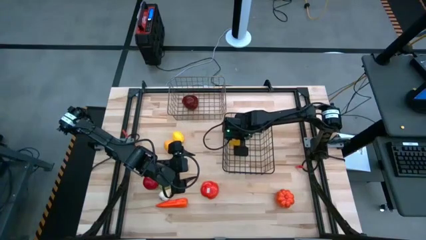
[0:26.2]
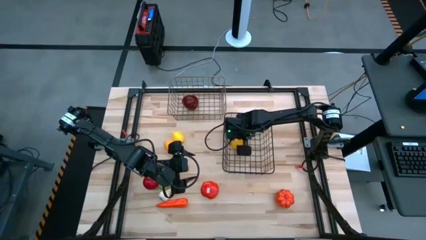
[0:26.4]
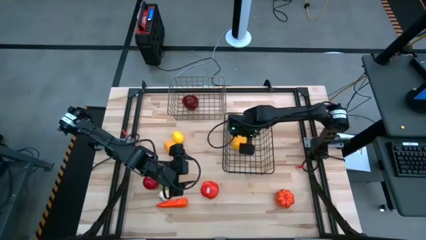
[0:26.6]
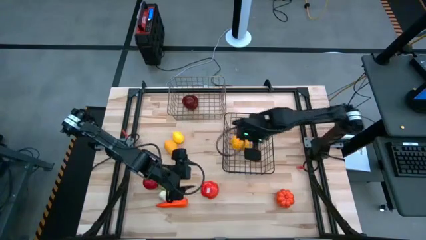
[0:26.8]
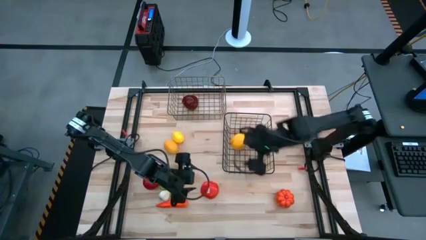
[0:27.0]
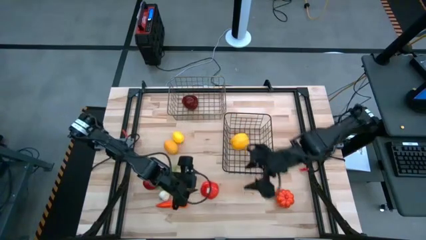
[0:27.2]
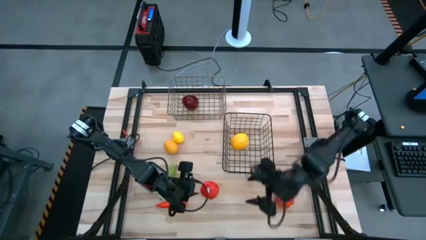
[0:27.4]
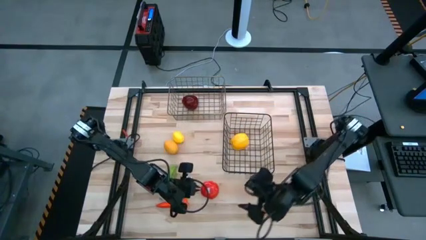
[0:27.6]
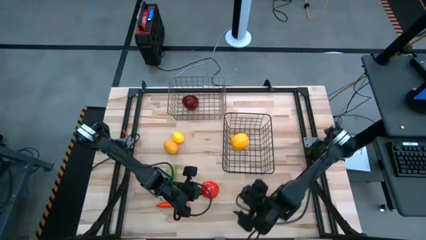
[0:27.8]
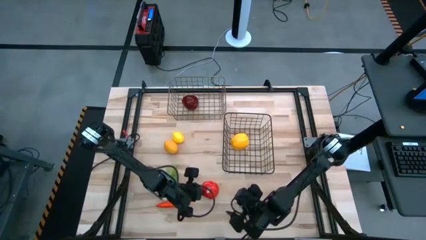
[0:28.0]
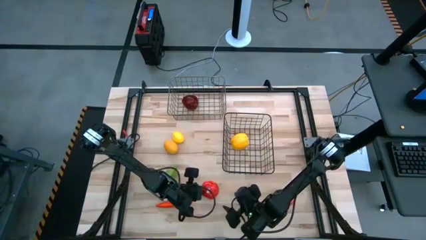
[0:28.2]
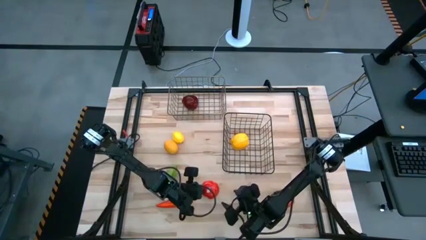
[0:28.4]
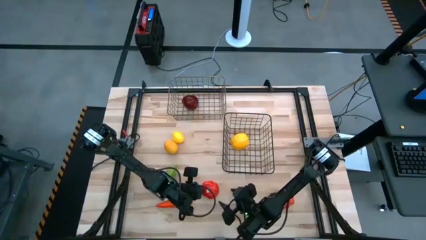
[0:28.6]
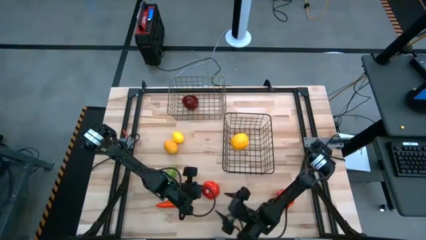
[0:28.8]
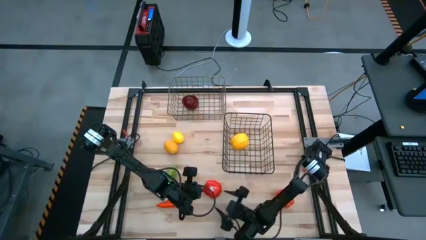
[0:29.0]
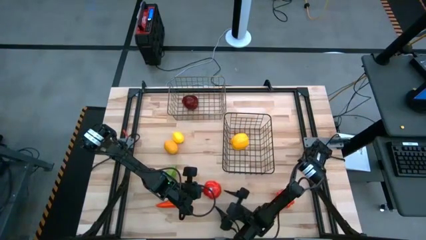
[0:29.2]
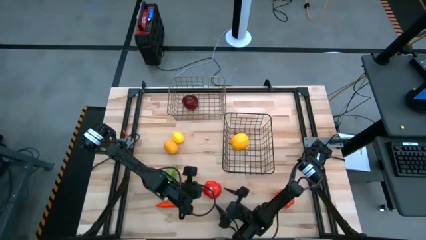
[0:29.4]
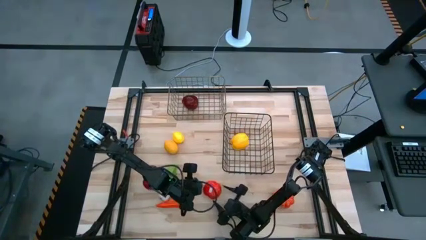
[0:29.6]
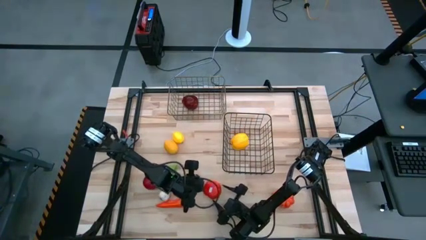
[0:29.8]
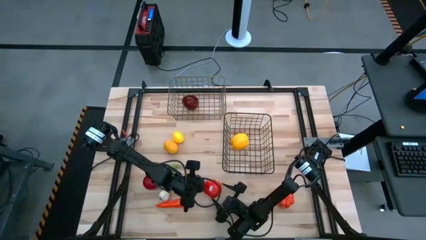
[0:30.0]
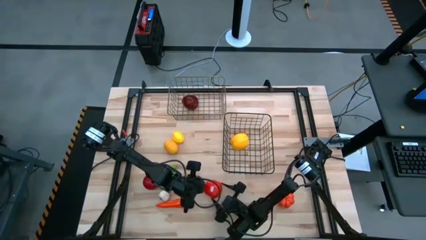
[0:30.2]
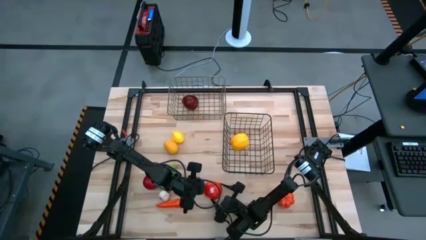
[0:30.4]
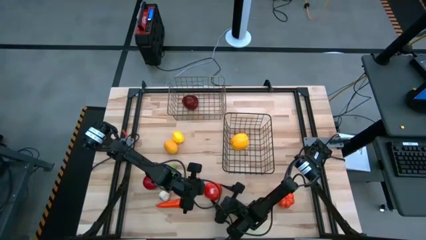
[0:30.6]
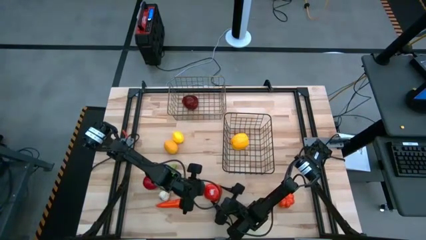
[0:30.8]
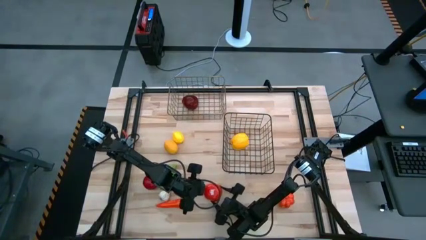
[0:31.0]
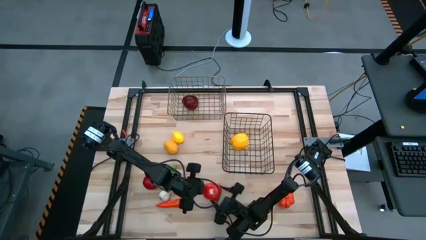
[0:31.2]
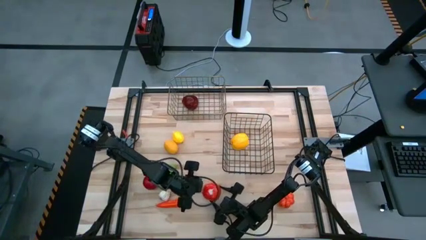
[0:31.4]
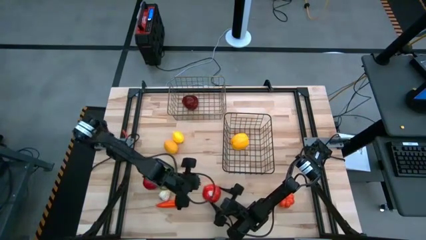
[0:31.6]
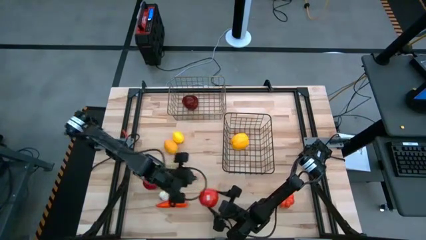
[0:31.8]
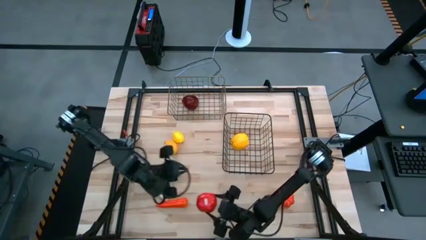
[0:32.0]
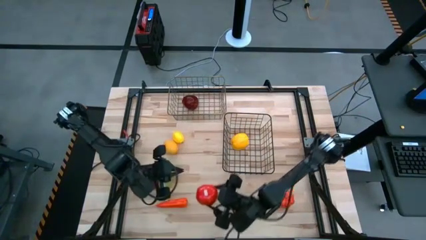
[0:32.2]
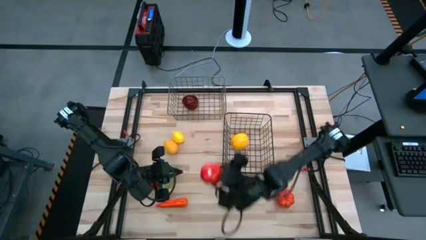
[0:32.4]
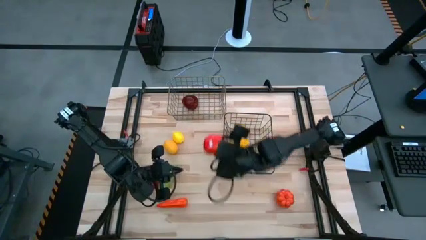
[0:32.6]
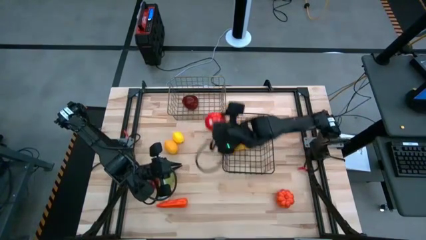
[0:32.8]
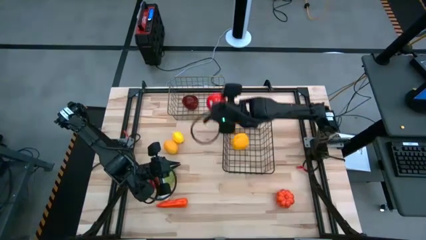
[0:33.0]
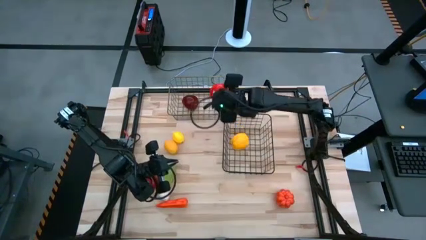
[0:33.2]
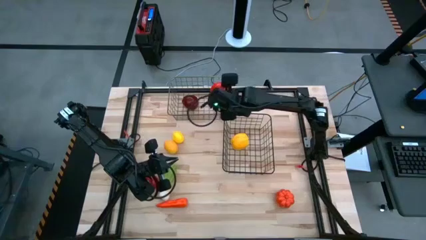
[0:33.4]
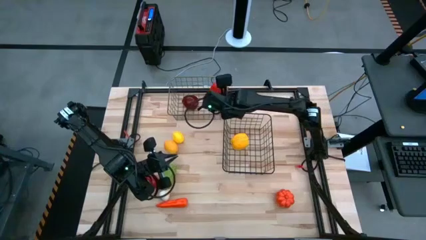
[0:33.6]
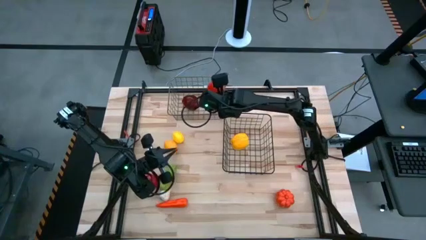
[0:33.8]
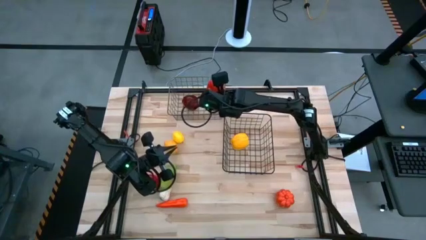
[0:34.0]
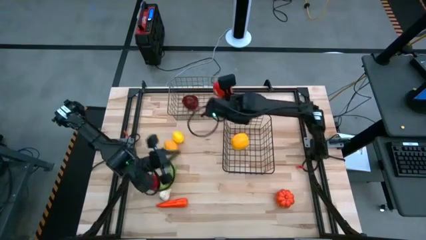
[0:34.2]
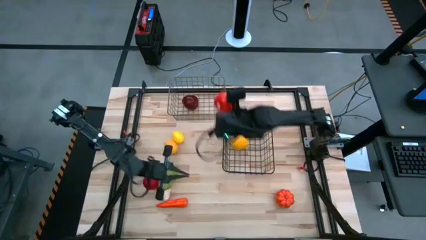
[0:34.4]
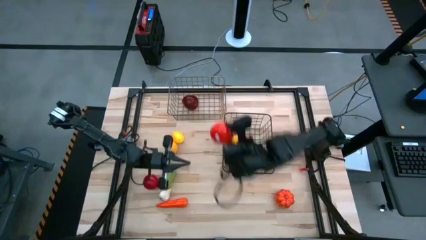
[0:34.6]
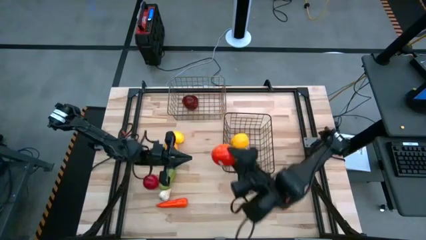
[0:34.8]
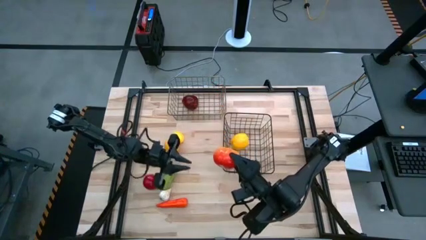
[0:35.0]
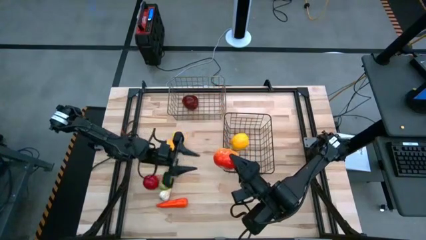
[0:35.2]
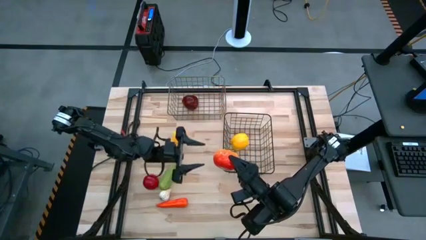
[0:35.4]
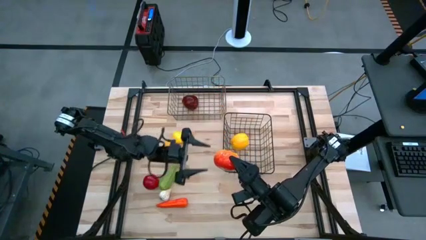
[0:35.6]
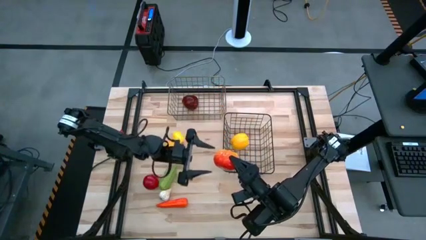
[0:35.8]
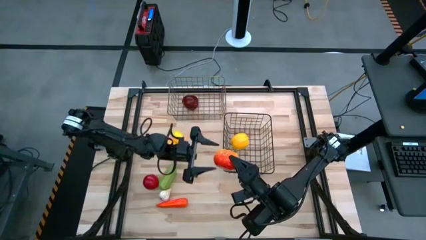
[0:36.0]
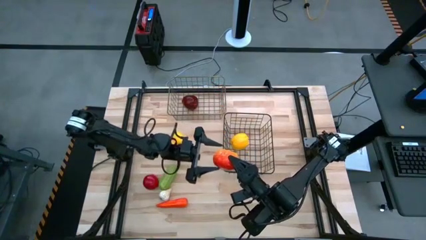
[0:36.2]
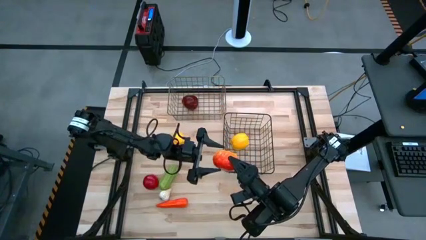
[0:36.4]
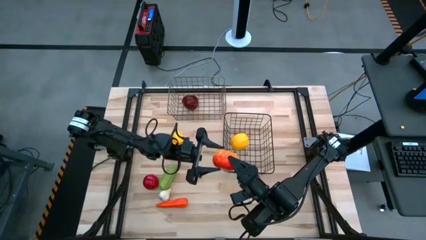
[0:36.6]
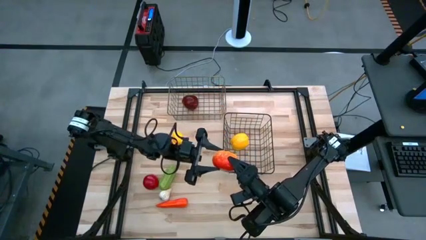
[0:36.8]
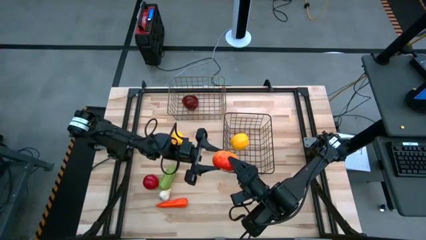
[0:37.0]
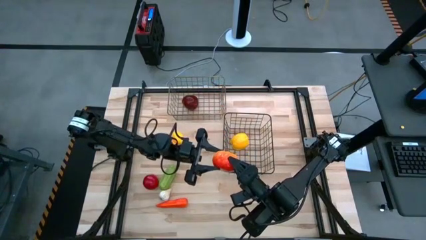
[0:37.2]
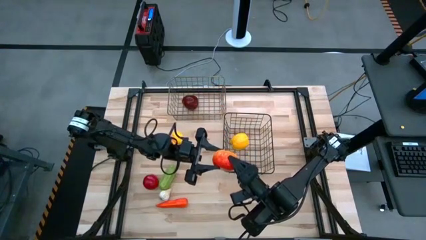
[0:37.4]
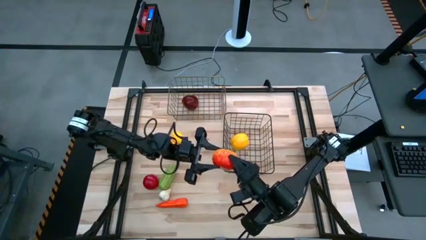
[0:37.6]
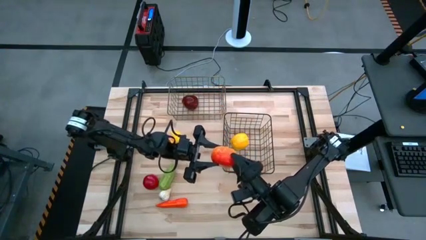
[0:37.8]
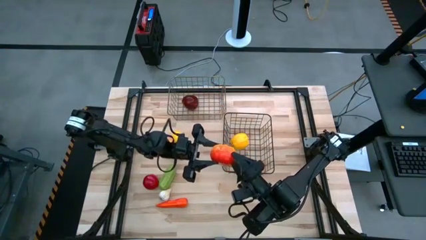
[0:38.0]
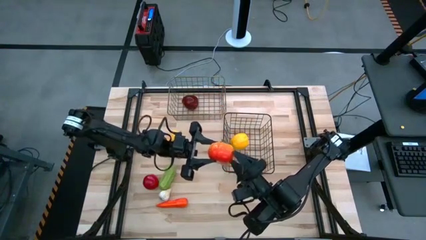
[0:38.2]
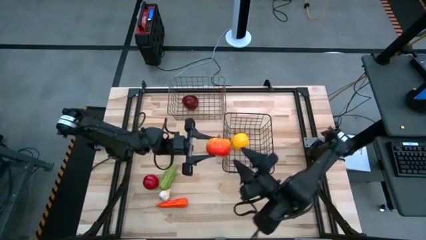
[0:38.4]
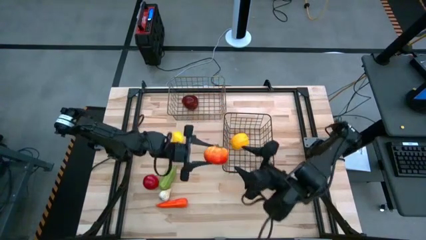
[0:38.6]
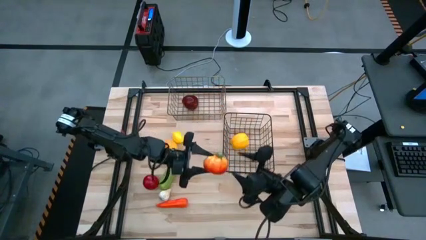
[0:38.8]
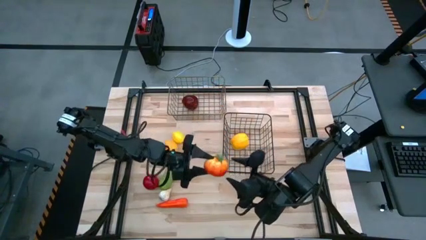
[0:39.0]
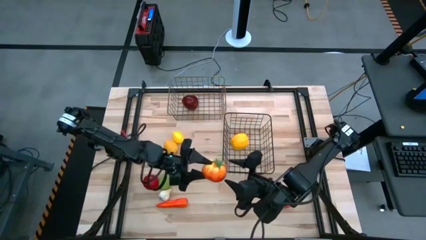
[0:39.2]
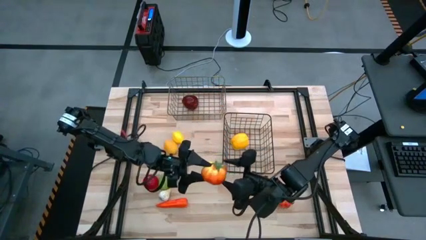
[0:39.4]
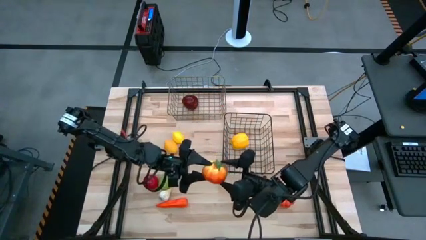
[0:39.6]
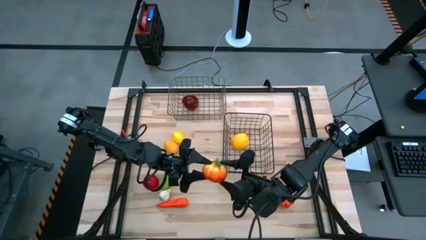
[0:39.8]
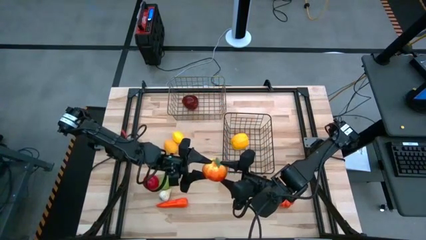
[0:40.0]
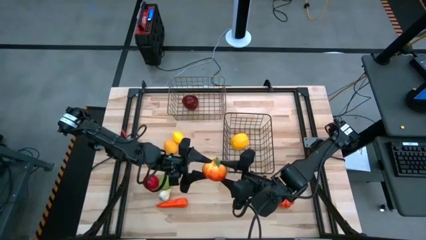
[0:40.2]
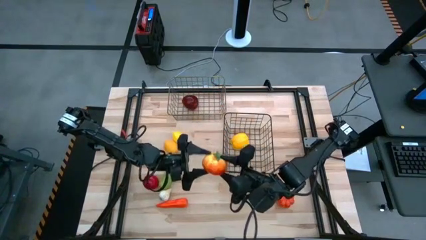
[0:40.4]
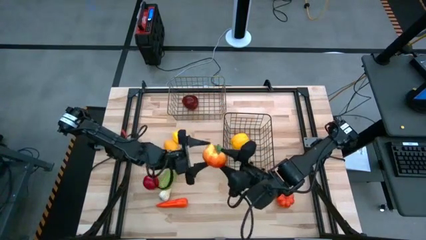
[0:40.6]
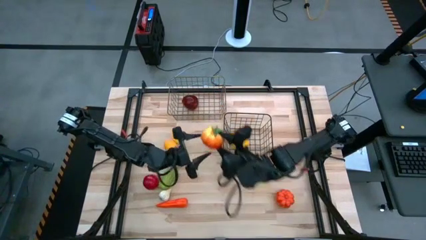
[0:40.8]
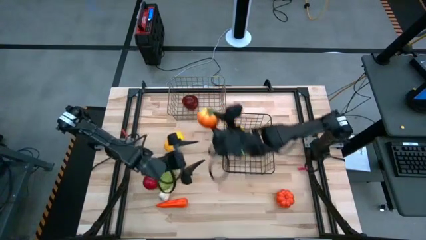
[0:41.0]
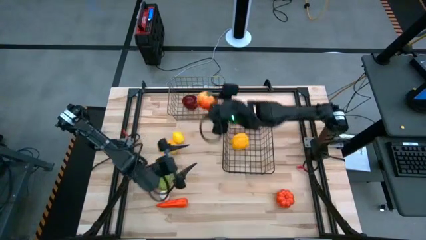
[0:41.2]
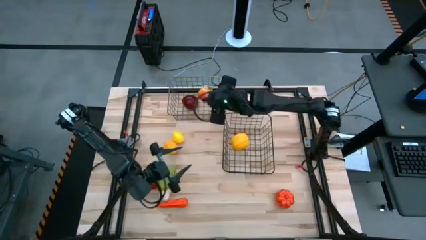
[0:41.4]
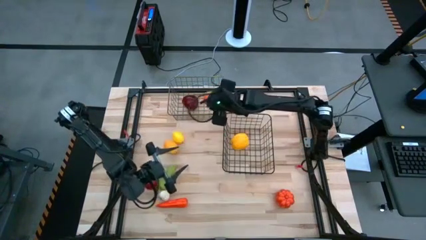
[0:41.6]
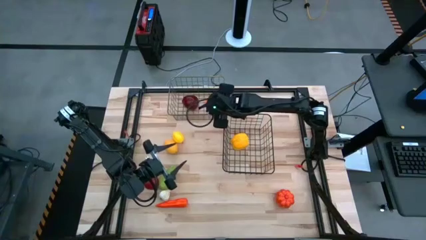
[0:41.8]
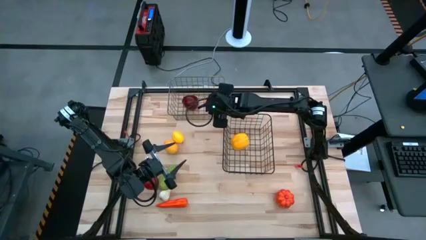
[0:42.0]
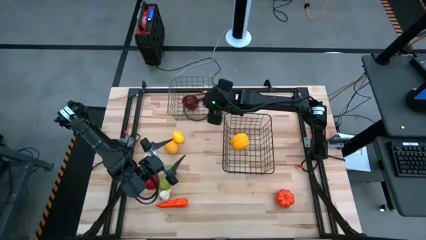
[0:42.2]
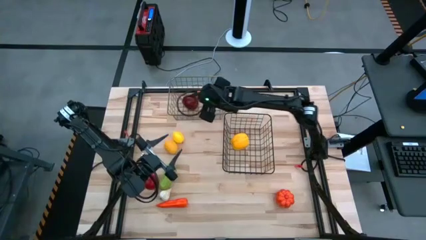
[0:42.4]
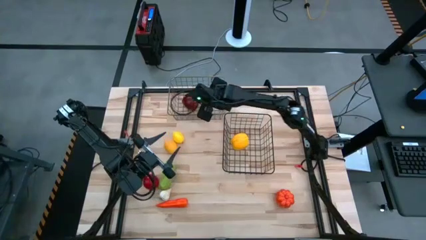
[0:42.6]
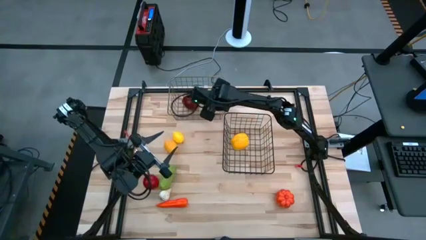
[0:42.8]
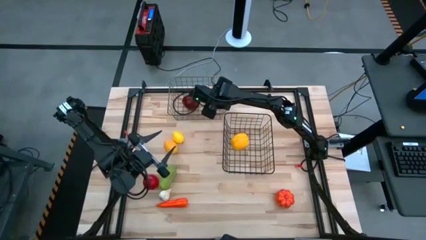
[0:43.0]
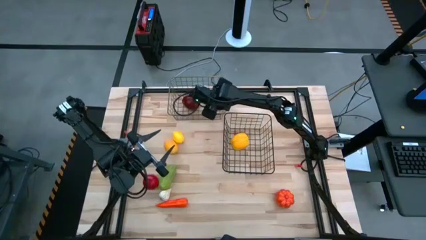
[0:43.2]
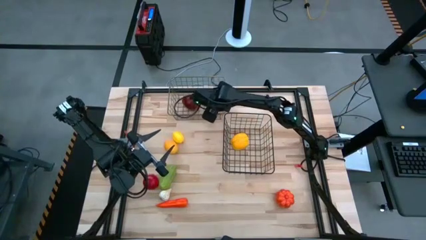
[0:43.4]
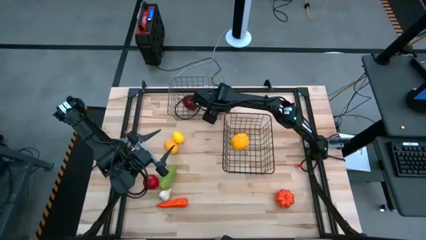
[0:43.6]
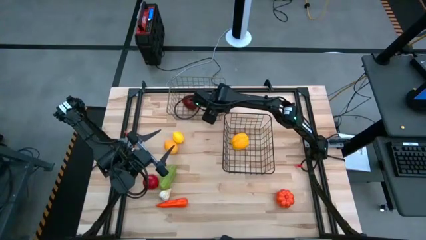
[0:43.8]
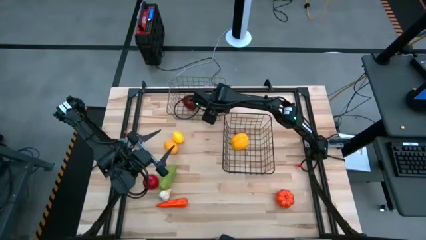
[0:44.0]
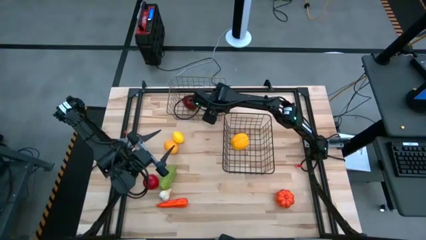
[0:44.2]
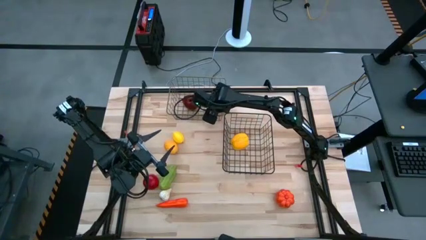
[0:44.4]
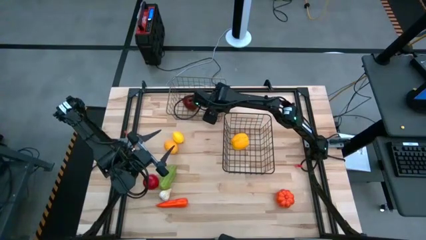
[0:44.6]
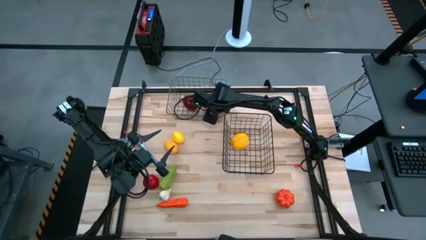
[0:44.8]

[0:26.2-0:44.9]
Task: Sort produce into baskets
Put the orange tomato into the silver wire basket
